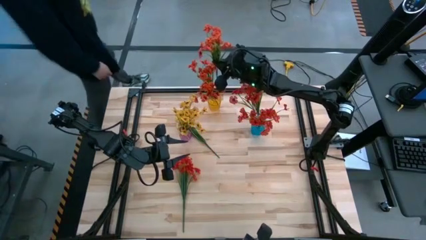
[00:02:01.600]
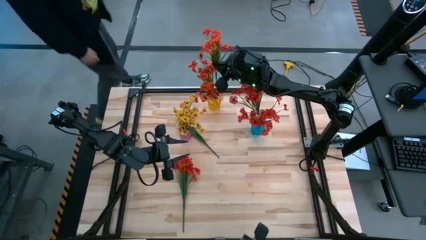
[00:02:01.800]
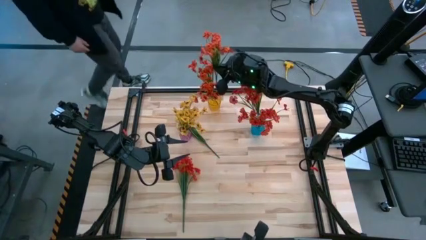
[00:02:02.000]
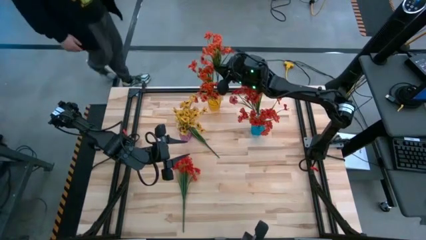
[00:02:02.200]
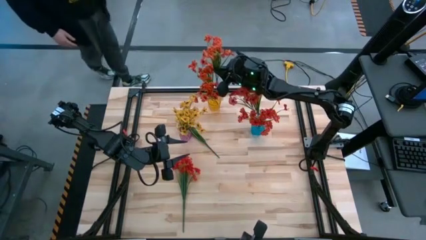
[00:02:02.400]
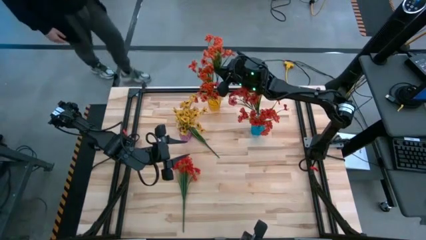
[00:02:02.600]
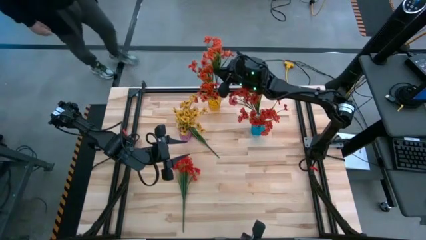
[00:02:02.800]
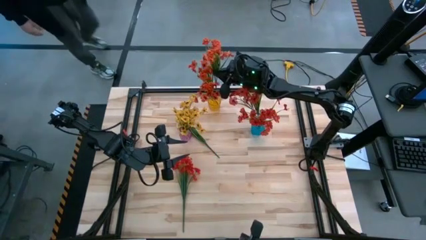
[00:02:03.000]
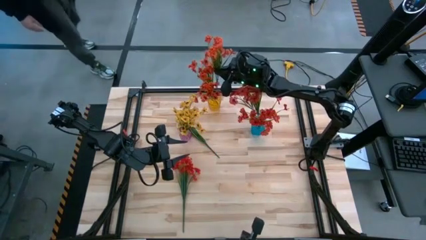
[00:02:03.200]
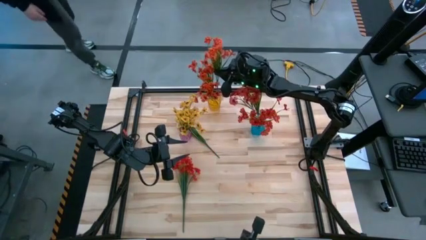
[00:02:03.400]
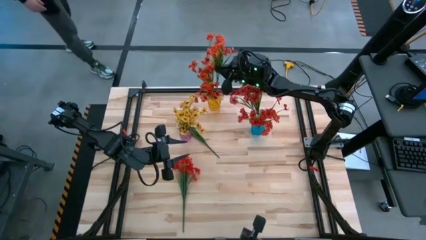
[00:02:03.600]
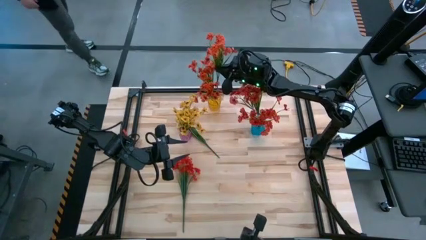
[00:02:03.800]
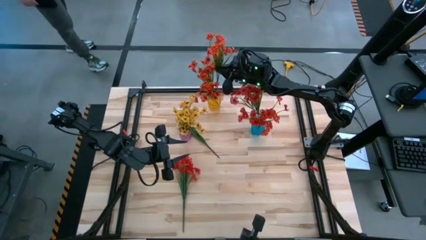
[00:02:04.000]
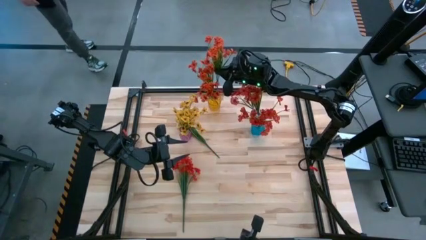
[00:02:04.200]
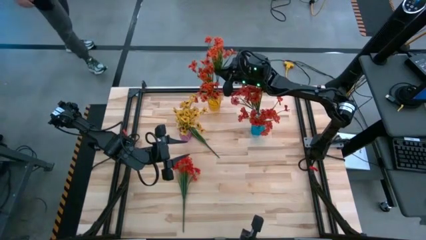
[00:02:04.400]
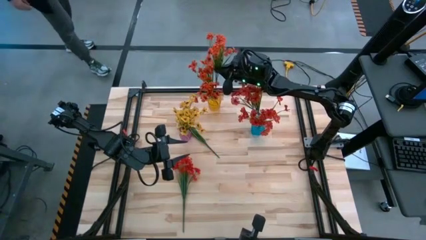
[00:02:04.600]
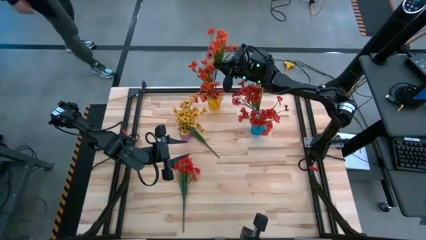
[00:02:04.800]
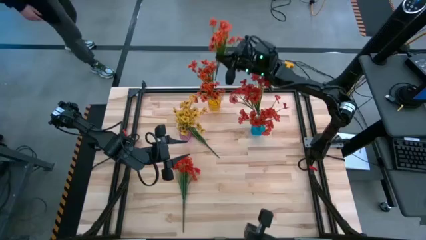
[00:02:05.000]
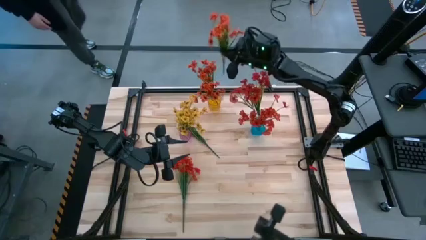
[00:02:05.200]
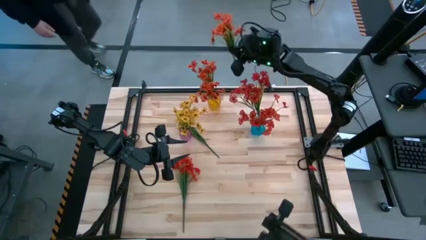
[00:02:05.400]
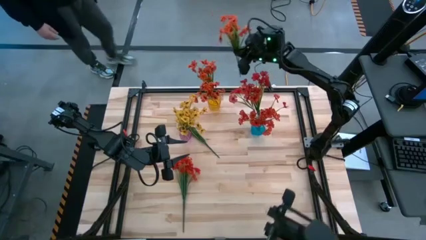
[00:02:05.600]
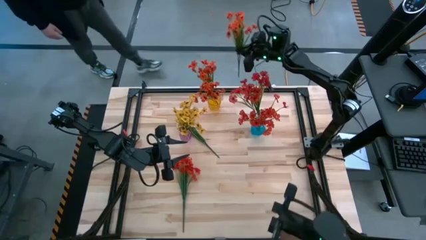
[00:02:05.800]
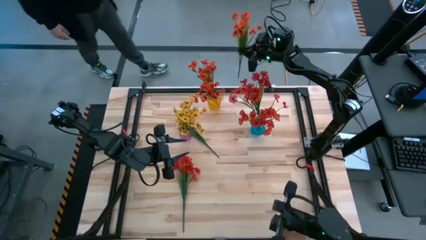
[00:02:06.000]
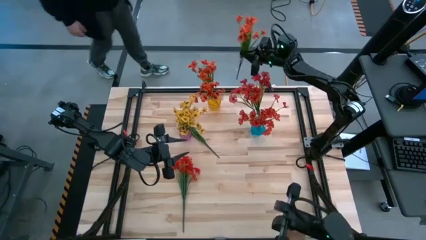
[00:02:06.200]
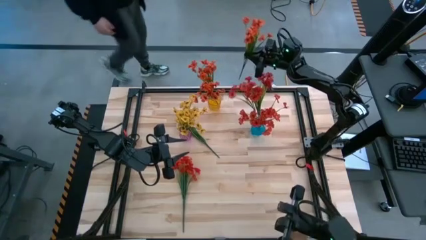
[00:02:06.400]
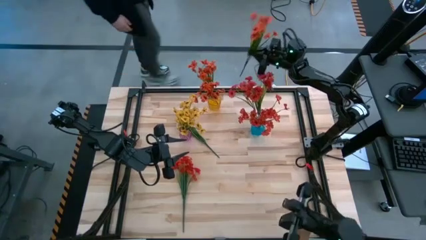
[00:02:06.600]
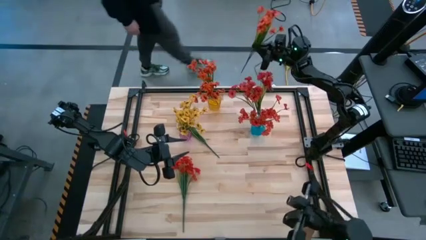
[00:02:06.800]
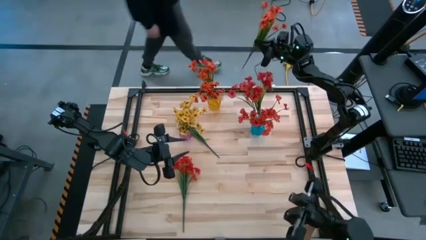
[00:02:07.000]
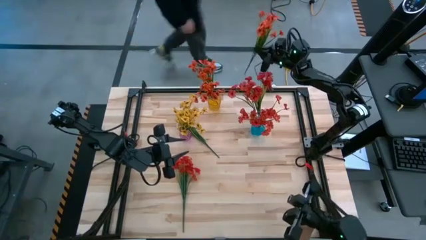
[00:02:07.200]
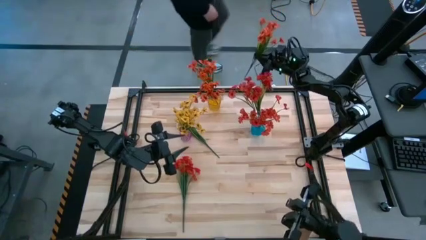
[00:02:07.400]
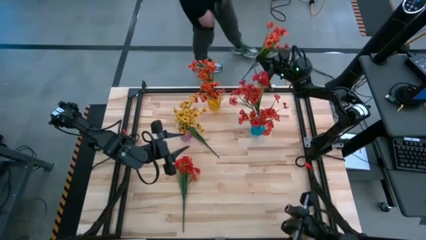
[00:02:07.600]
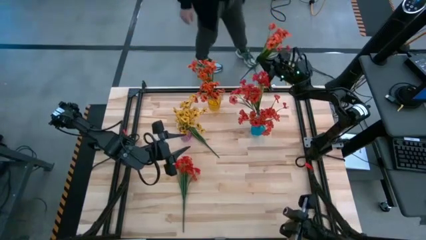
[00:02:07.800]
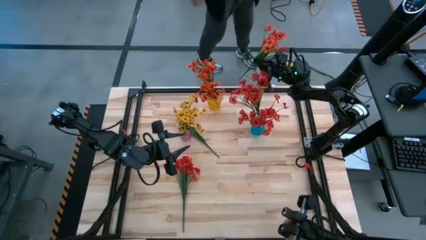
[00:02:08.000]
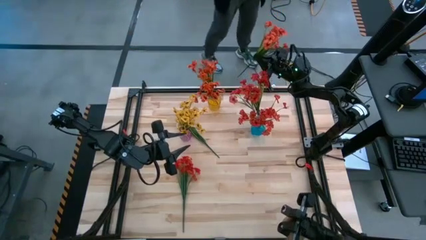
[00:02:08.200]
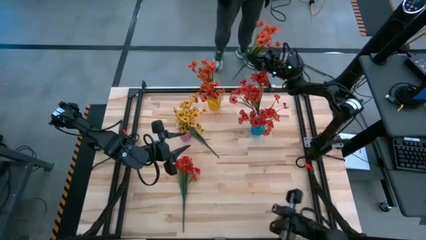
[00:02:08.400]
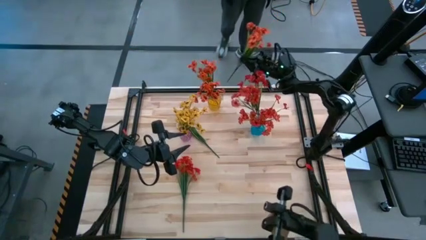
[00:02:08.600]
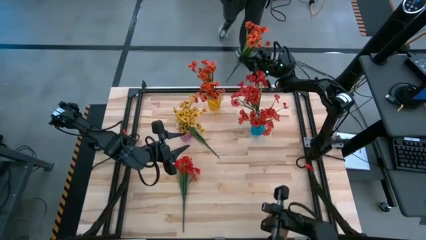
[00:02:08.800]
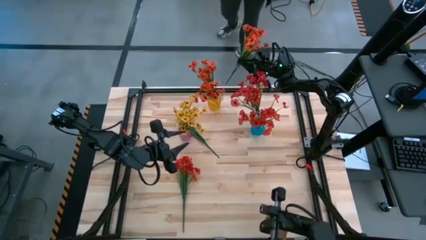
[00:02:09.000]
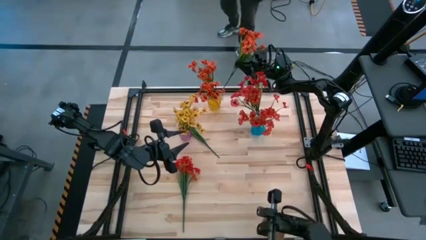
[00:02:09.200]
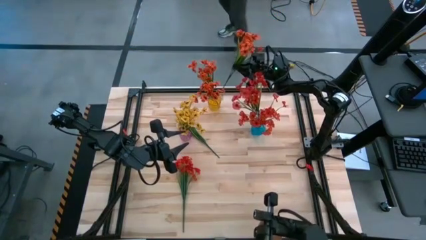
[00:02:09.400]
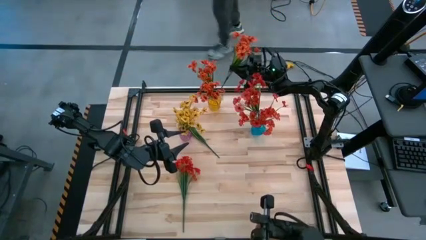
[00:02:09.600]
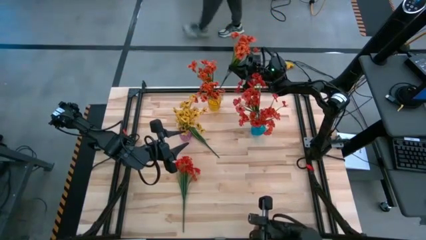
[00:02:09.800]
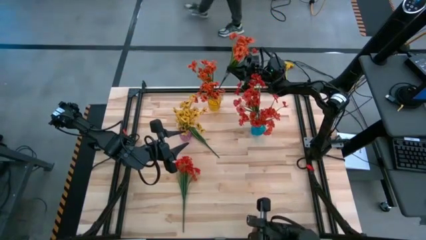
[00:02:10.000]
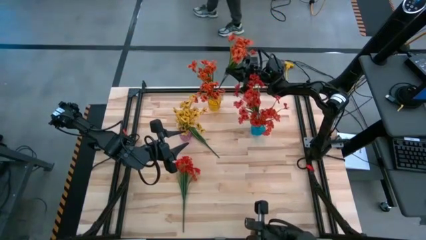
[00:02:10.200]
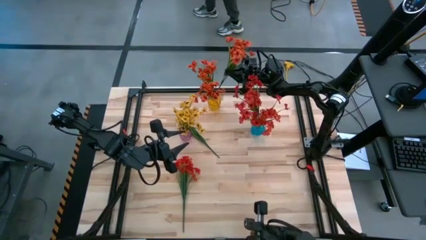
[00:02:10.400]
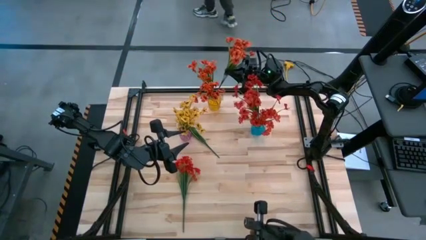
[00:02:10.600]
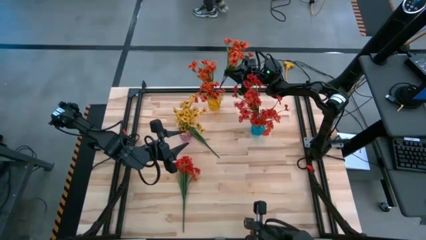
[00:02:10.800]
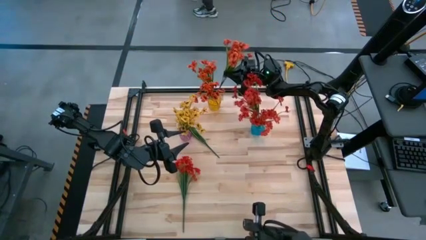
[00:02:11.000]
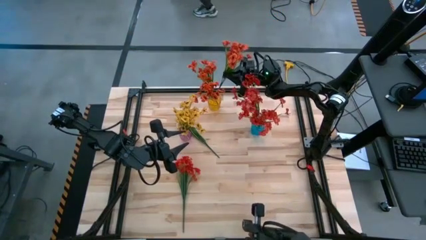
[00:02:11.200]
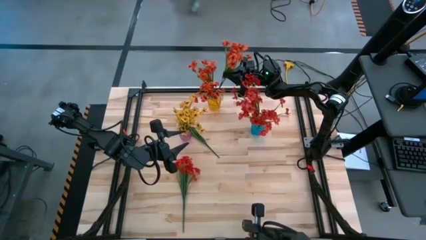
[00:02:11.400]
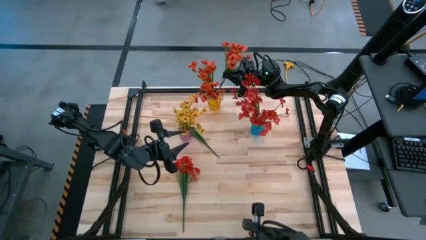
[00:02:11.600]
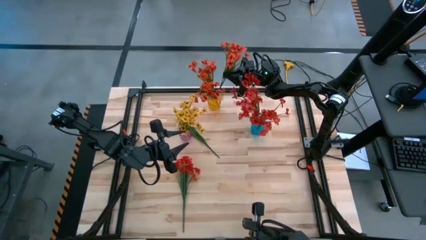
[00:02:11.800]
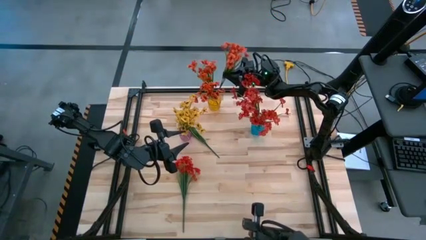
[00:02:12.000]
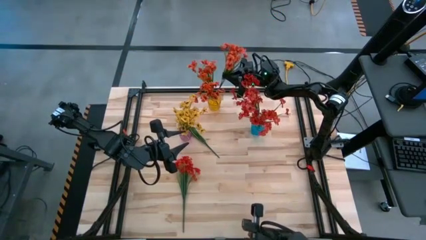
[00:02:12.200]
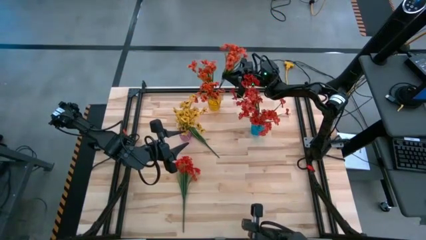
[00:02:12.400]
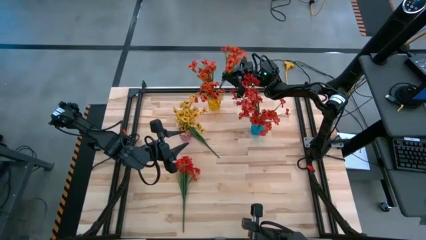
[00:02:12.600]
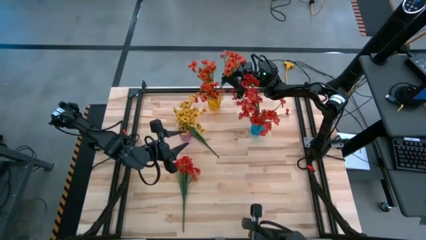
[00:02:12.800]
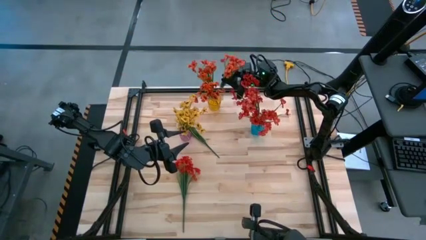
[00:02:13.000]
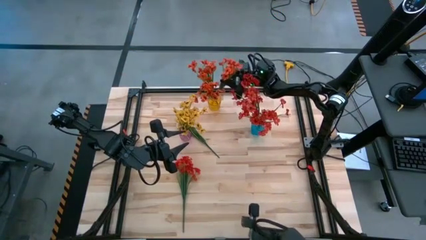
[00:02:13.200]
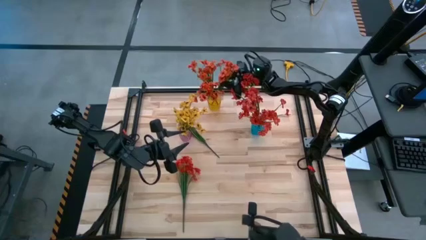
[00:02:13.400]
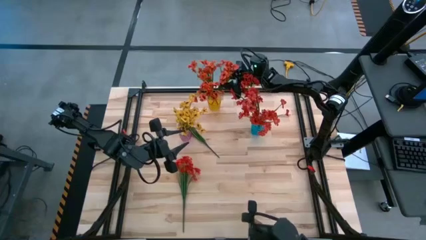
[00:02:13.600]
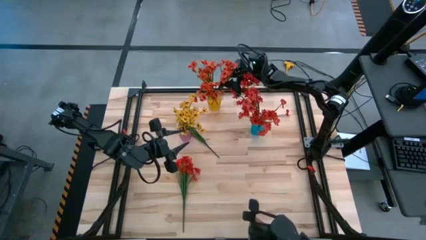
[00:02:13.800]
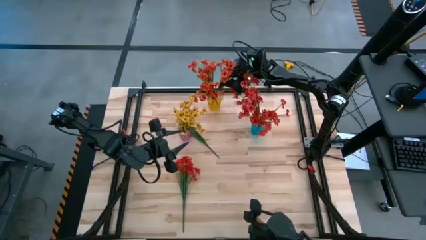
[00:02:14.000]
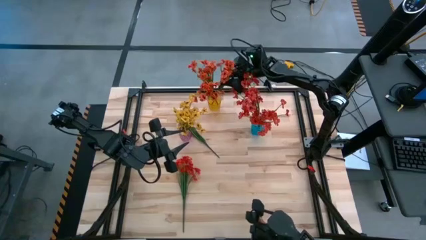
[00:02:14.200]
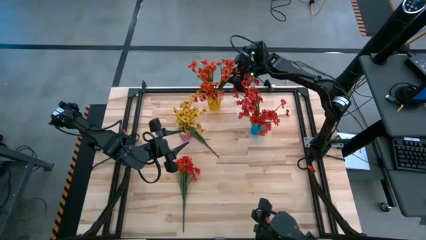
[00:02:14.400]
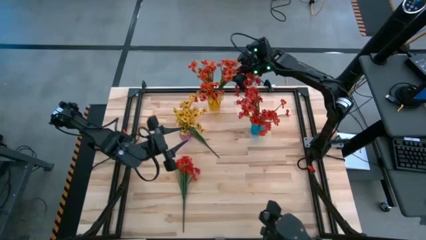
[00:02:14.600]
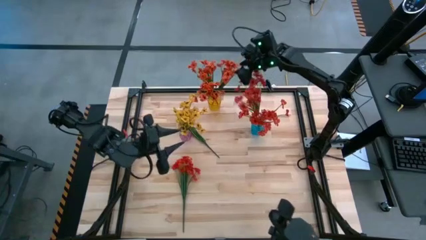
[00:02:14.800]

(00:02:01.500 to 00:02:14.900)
Task: Sort flowers into vase by color
Put the orange flower into the yellow vase

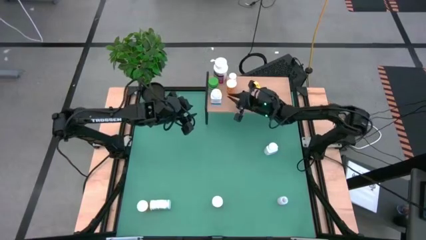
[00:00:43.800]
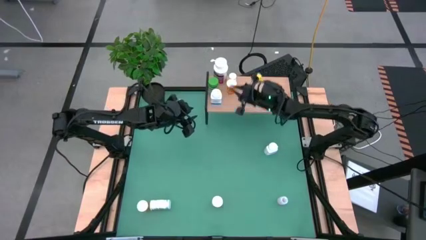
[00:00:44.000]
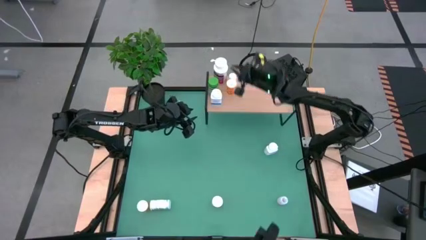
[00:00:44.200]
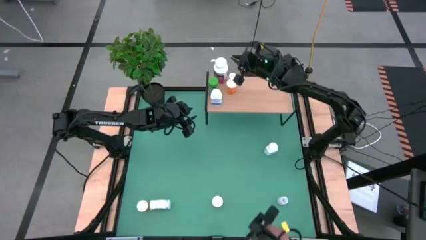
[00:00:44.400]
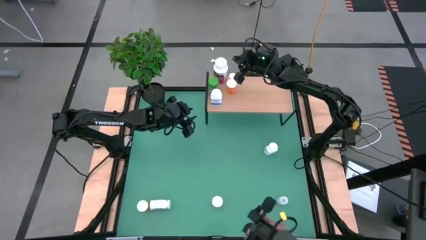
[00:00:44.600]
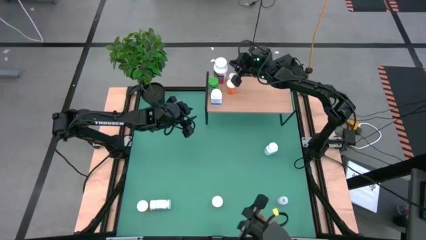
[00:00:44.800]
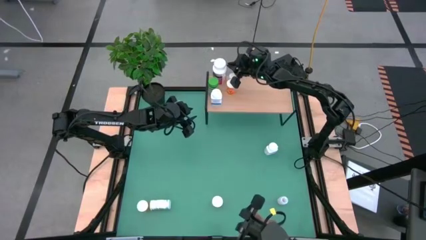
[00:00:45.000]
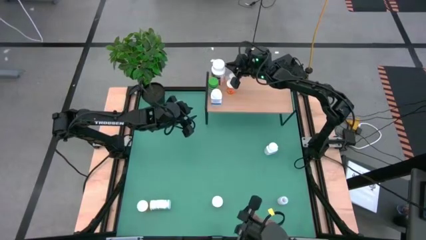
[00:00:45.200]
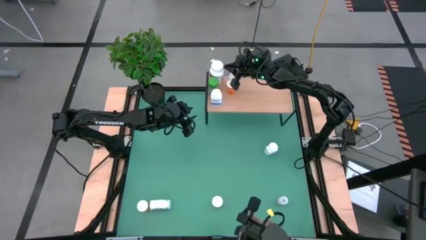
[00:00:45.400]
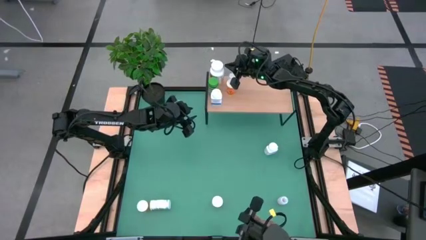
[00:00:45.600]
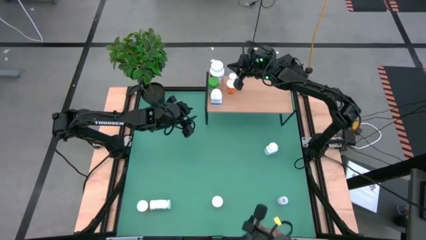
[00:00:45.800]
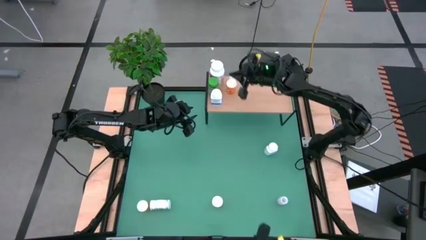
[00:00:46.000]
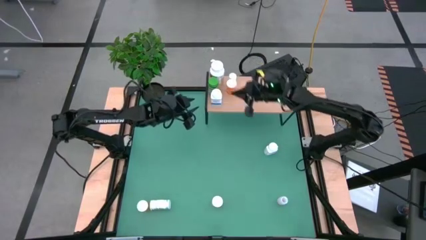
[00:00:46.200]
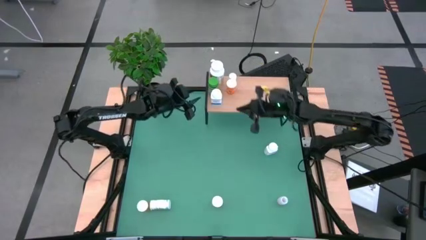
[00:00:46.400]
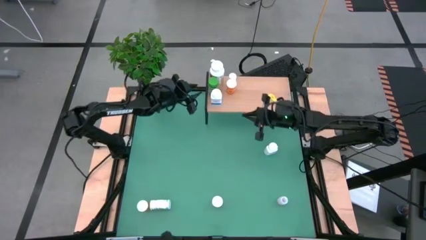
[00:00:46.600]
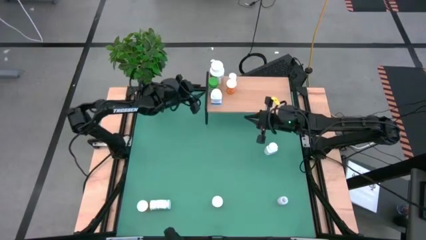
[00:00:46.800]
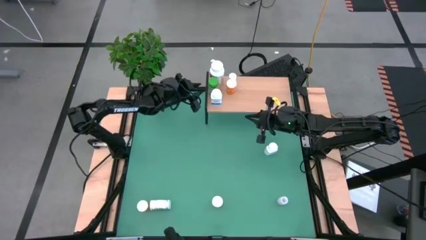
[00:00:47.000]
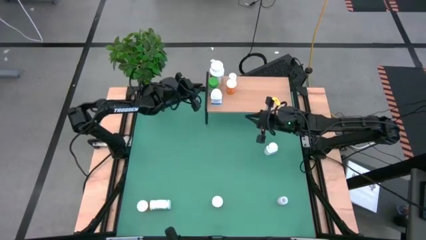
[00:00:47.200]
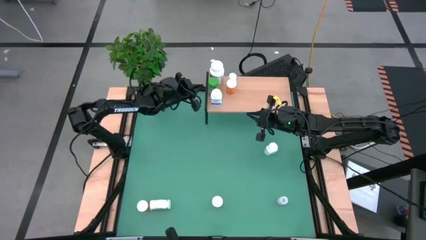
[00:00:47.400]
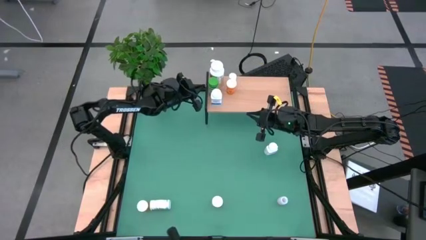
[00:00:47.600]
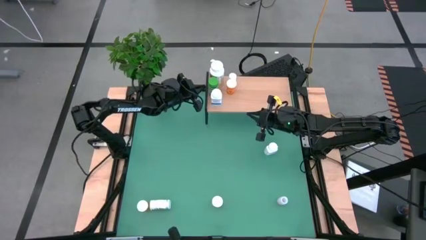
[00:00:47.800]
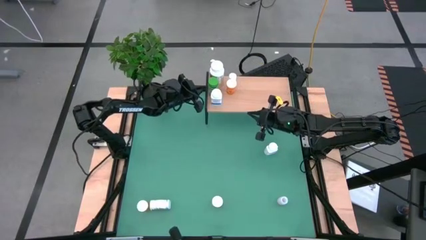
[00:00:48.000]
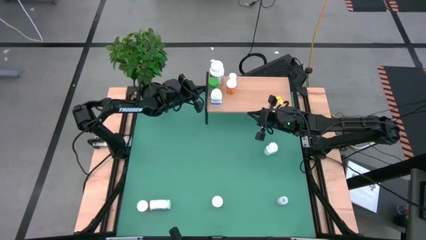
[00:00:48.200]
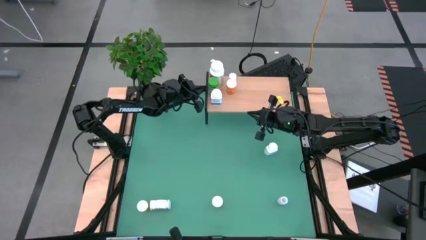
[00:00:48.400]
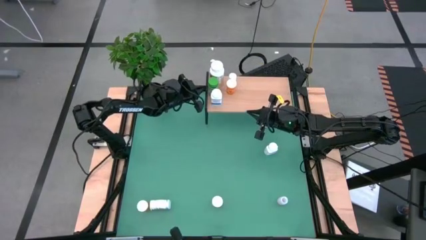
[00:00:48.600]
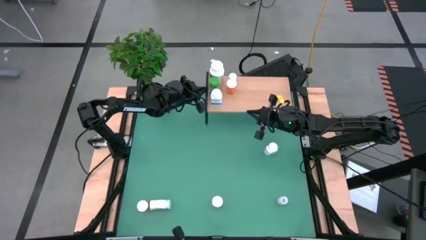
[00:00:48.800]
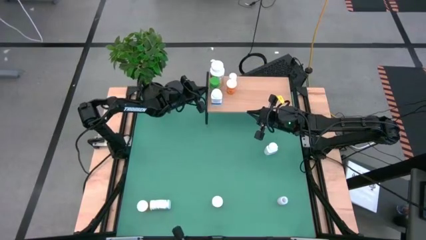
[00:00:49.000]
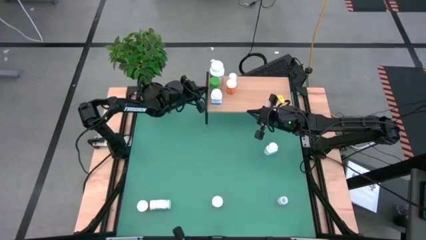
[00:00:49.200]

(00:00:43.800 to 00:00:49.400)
Task: Pick and place medicine bottles onto shelf by color
Adjust the medicine bottles on the shelf
